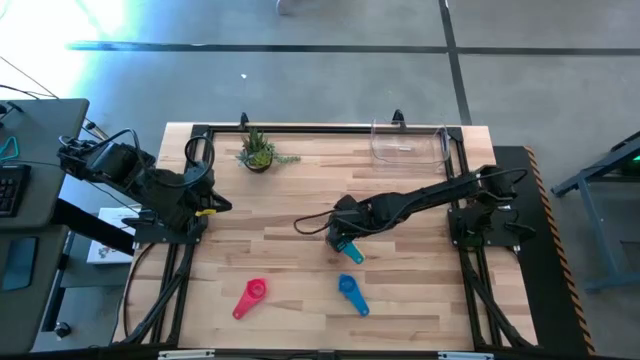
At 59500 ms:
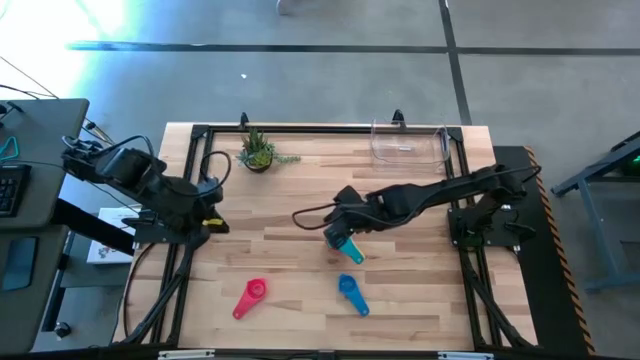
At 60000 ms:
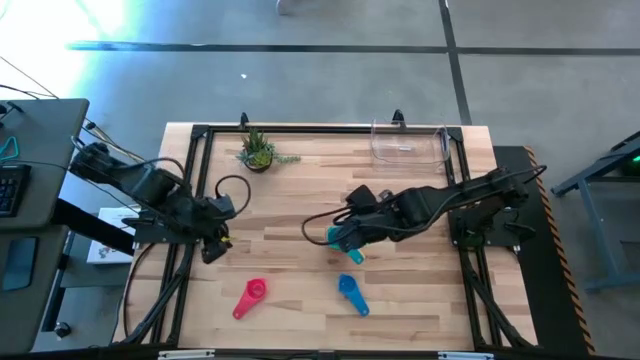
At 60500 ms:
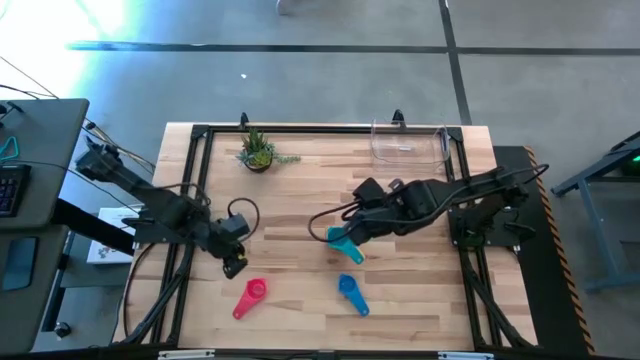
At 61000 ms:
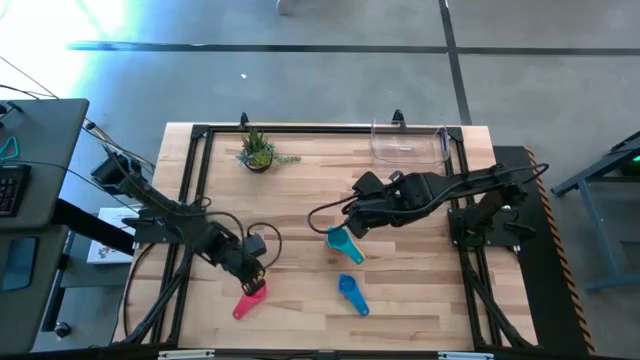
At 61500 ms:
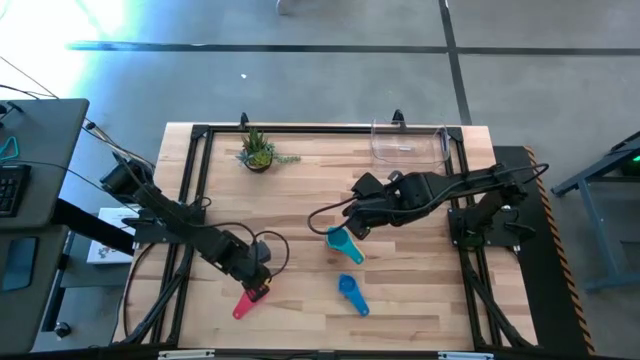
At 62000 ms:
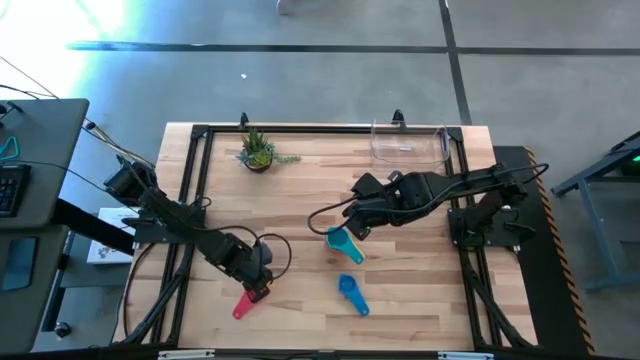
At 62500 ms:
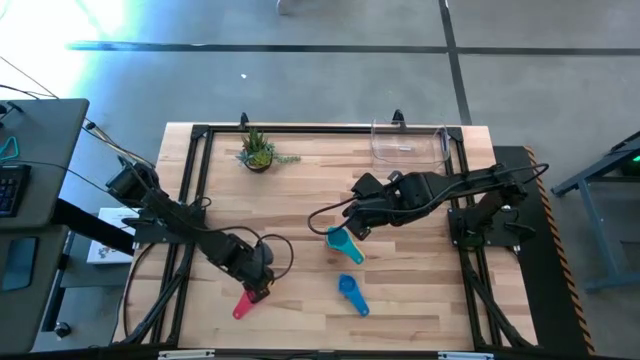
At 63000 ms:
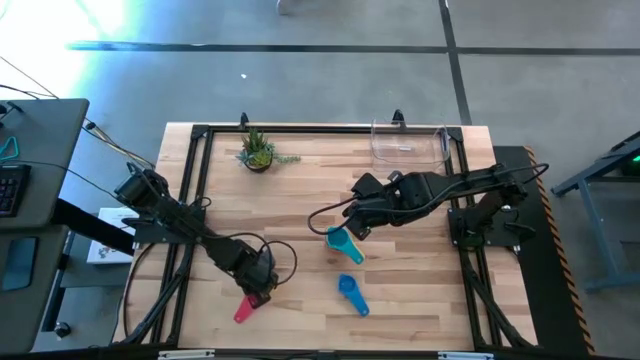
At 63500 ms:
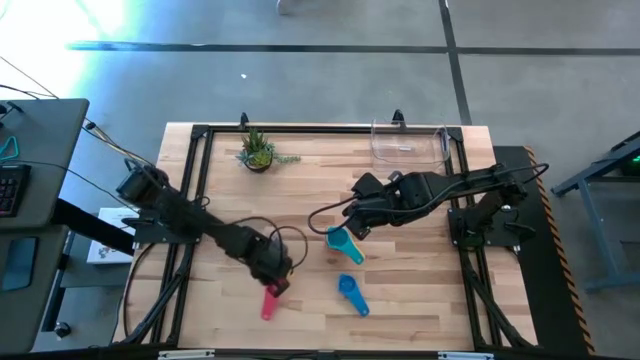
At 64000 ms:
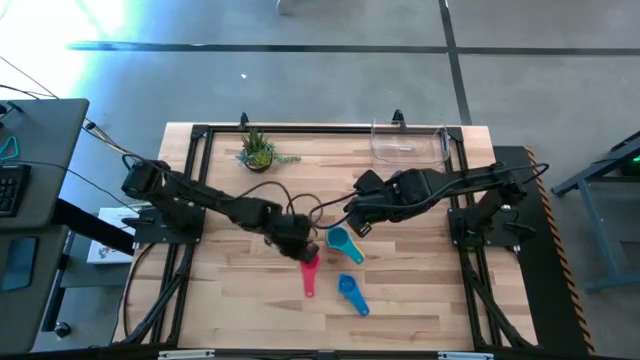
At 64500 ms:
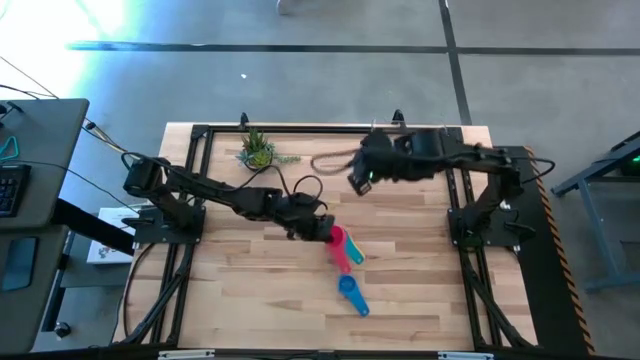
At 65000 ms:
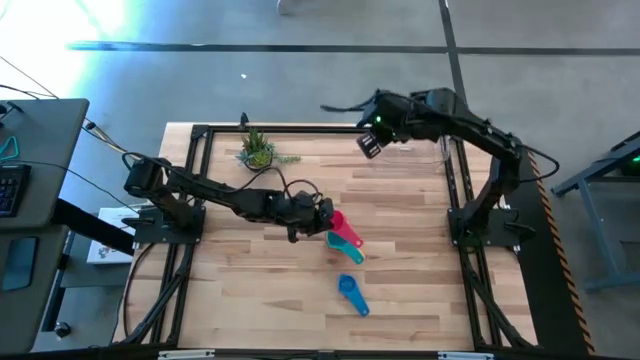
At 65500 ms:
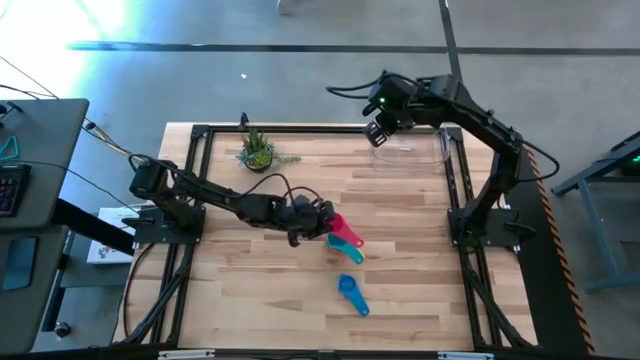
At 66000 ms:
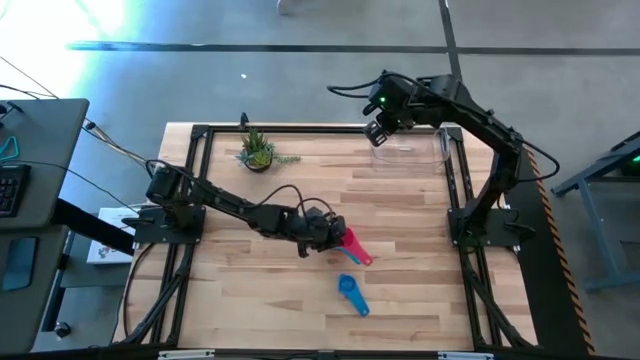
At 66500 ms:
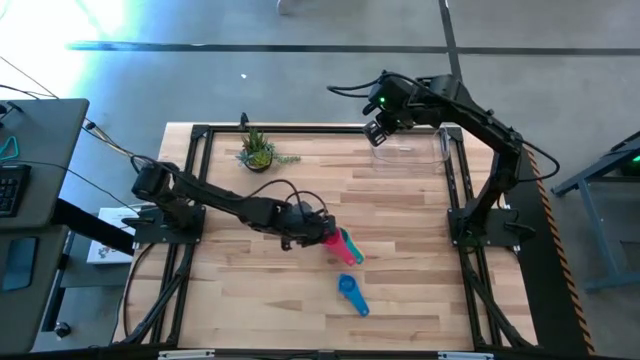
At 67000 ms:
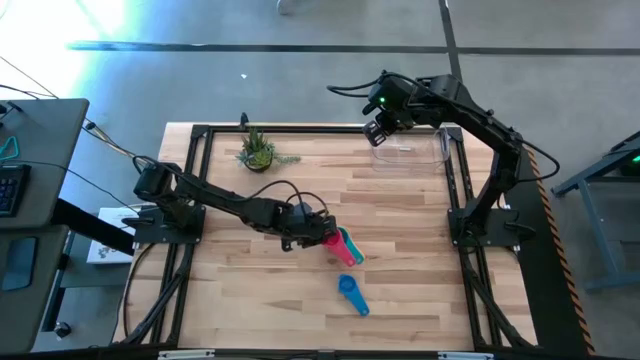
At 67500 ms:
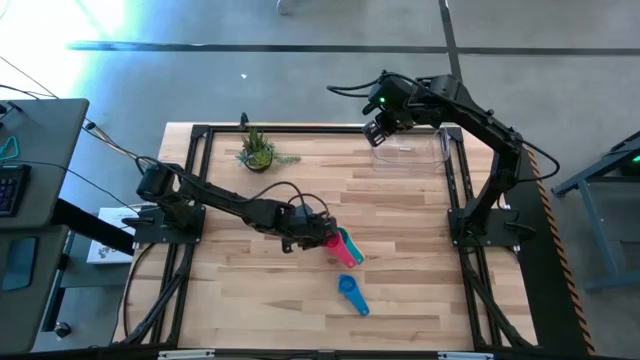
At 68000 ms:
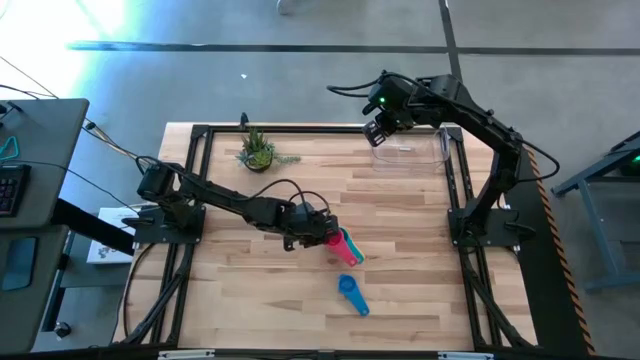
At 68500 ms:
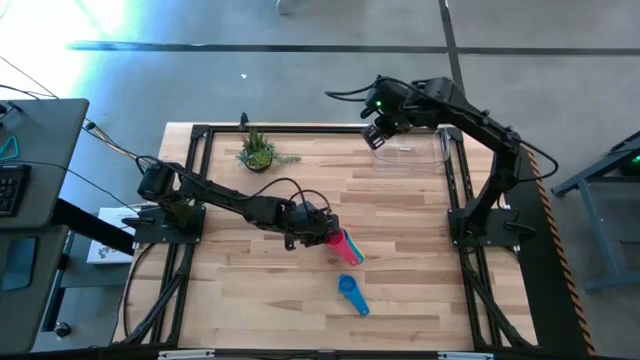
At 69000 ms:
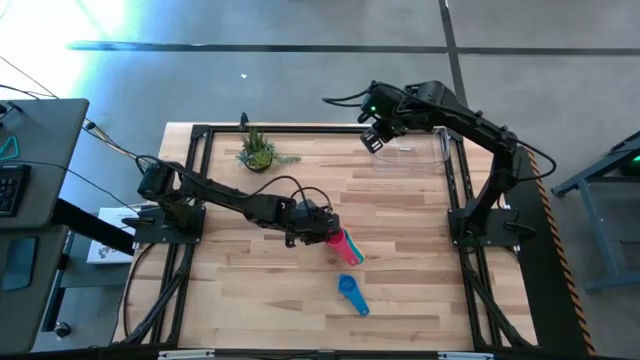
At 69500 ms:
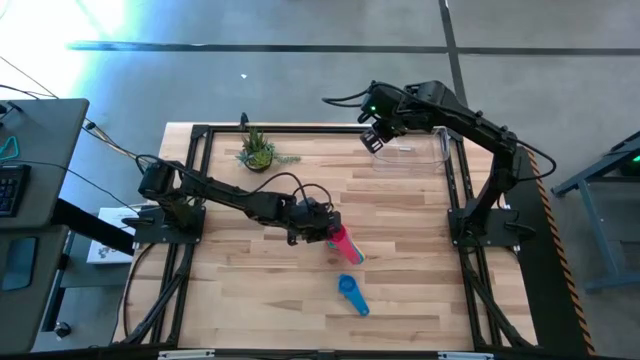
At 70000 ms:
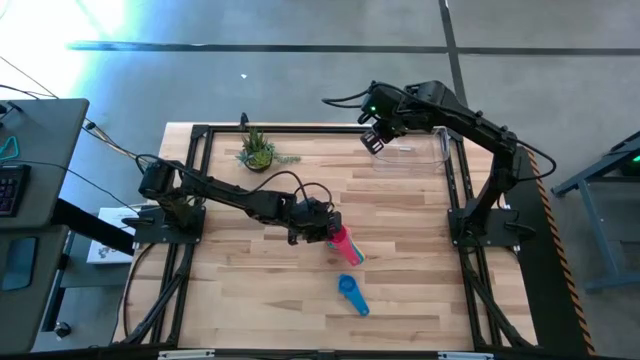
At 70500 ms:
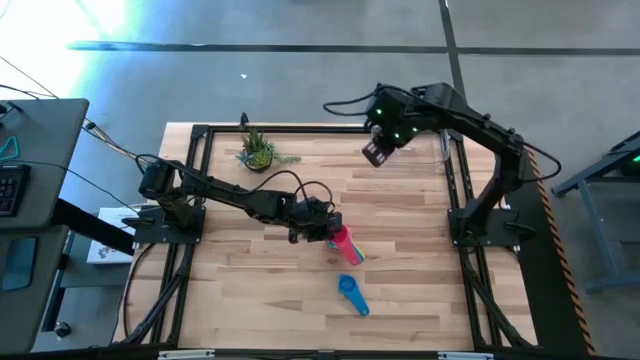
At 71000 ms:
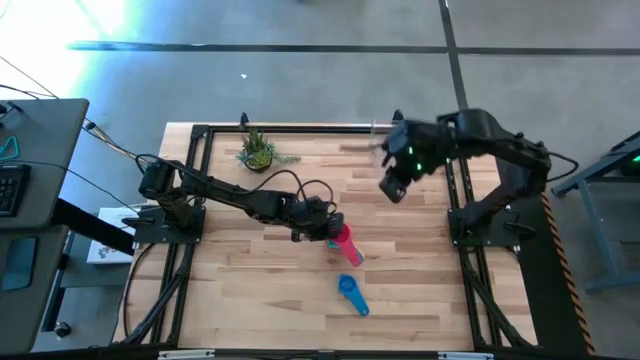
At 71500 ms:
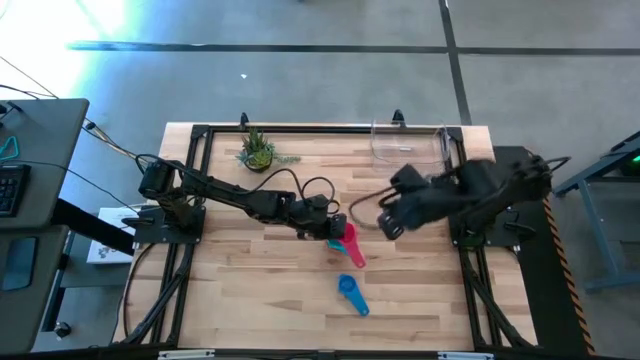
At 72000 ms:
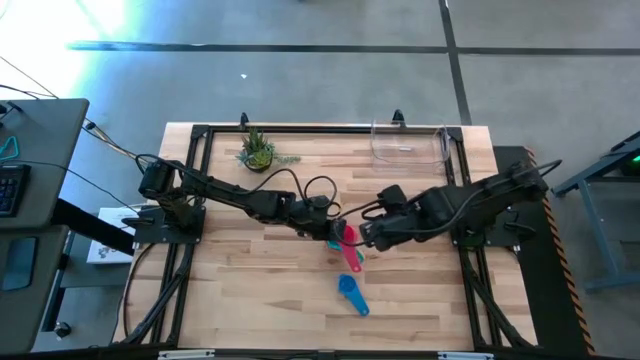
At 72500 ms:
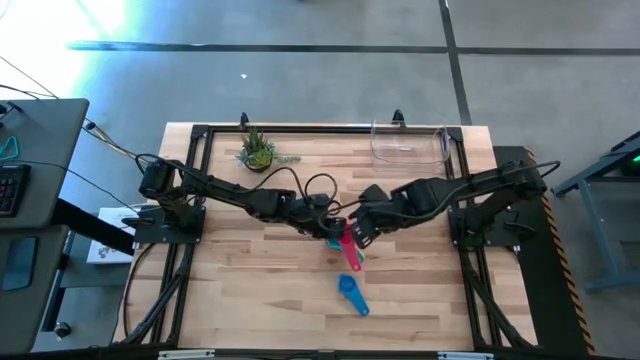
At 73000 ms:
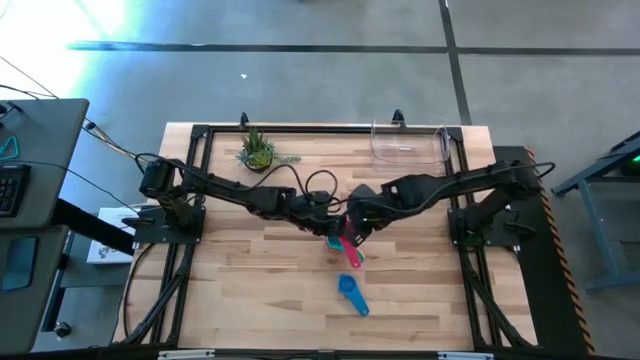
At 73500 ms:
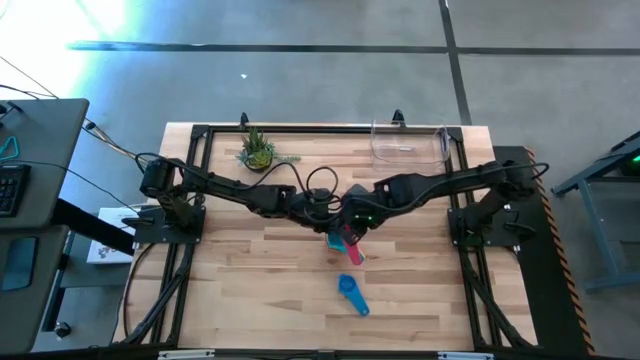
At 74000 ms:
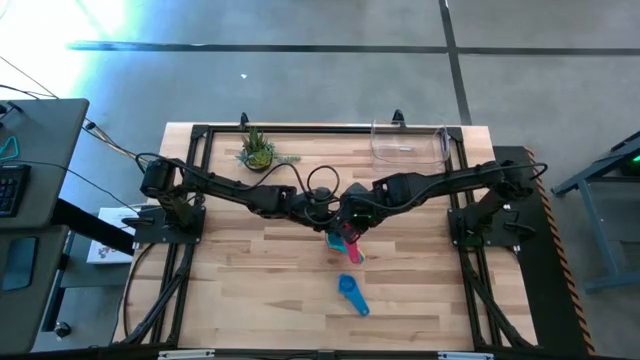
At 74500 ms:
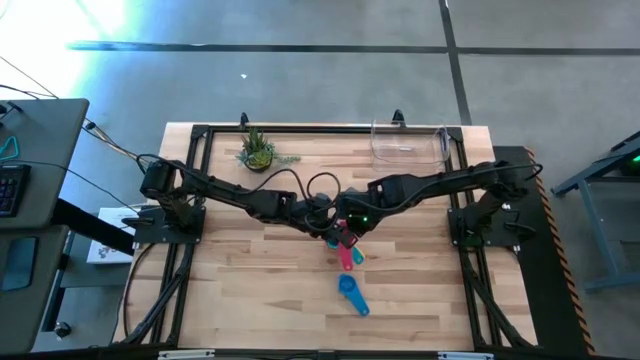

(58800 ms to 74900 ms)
Task: Nest measuring cups in basket
Stack the red measuring cup on top of the light blue measuring cup

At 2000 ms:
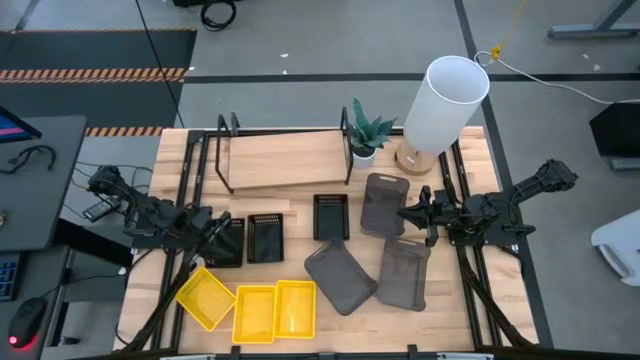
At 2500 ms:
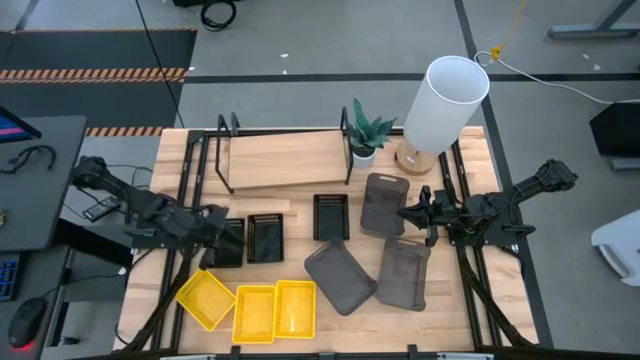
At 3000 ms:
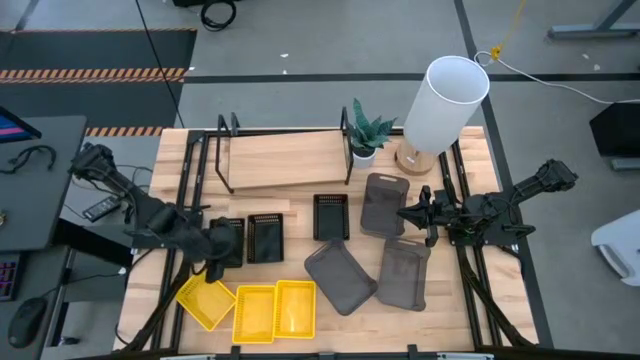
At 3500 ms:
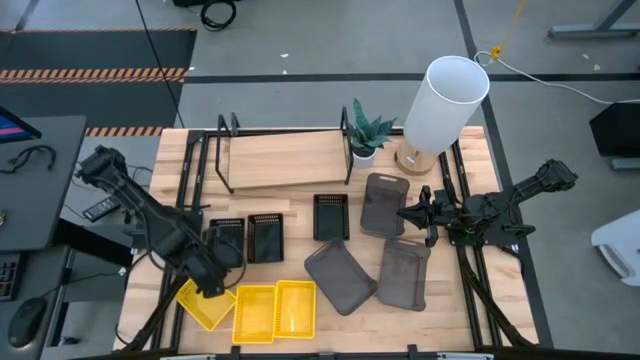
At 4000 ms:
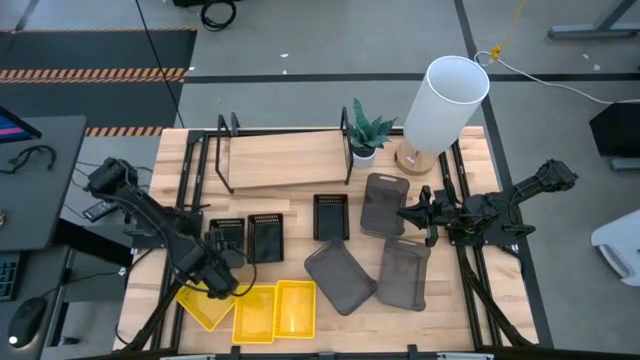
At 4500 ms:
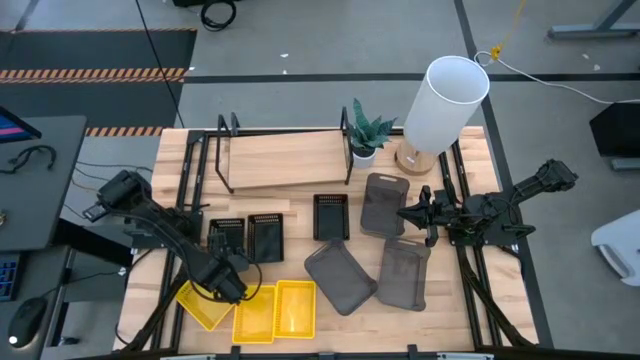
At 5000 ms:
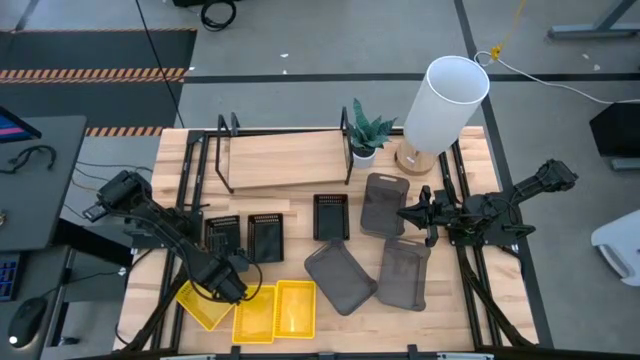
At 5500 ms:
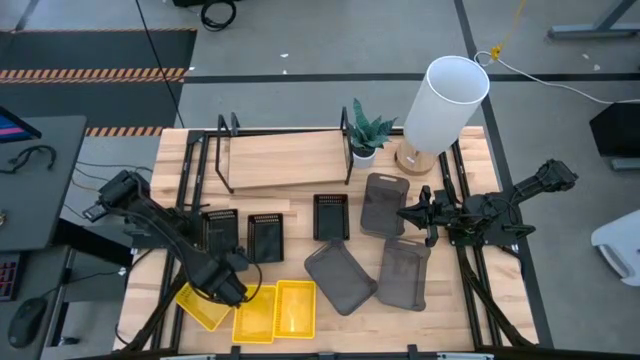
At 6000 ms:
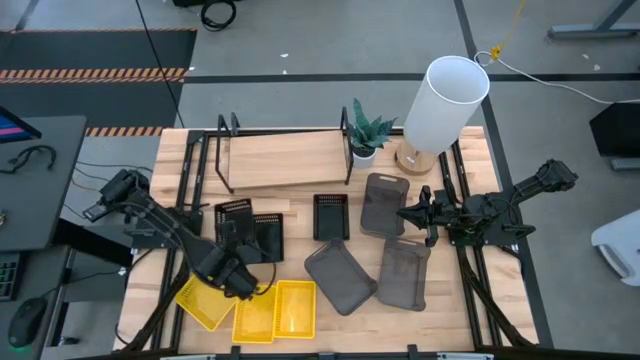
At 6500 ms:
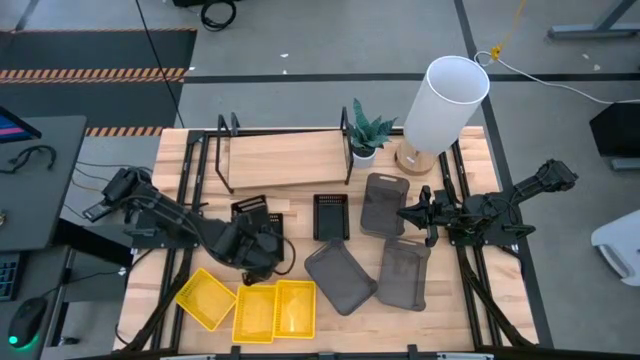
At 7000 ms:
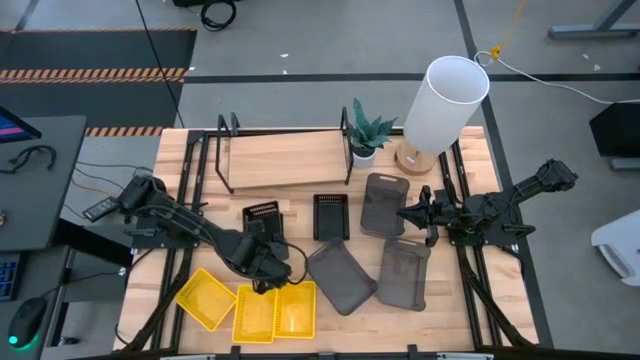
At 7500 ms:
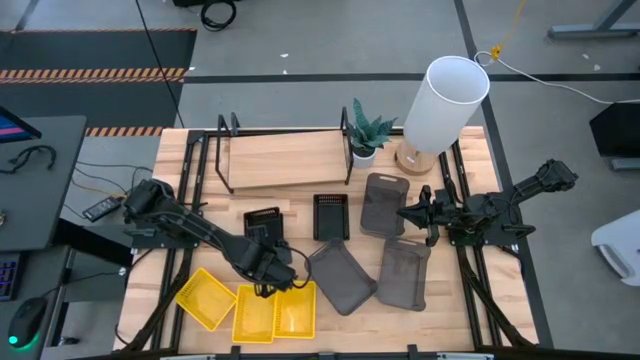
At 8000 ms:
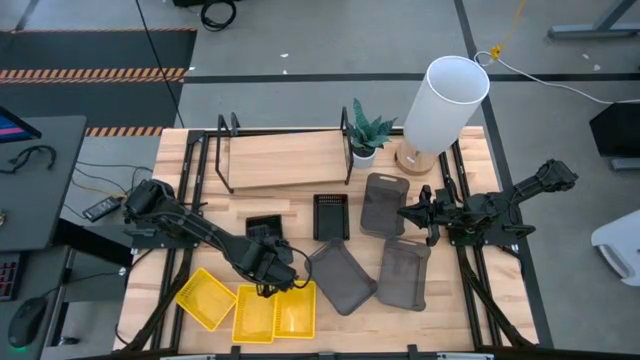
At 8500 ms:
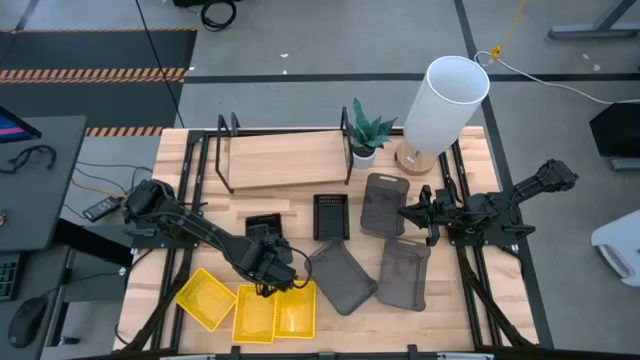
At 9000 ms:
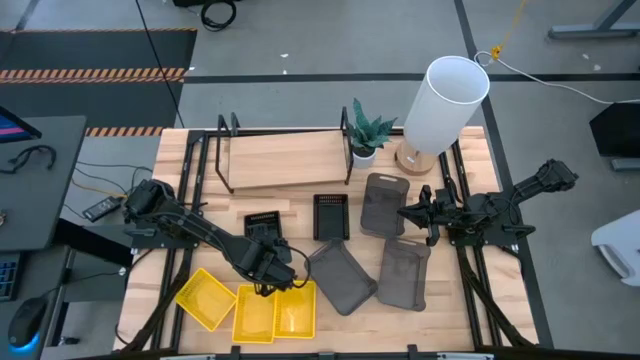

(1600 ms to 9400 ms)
Task: Stack baskets on shelf by color
Stack the left black bin on top of the middle black bin
